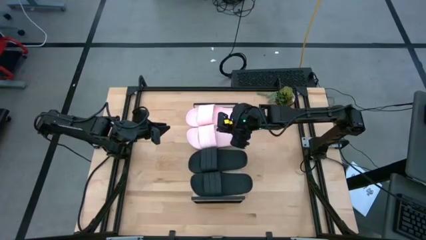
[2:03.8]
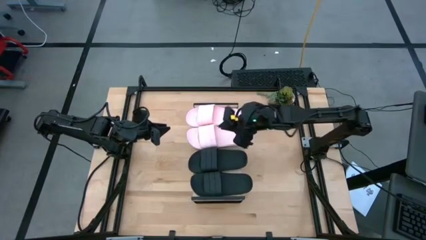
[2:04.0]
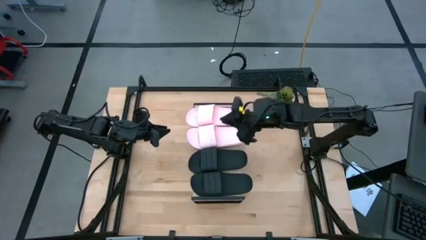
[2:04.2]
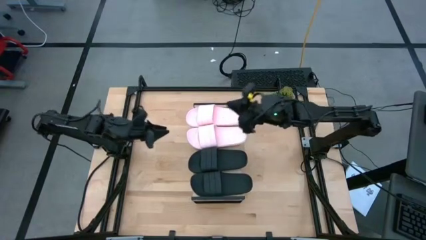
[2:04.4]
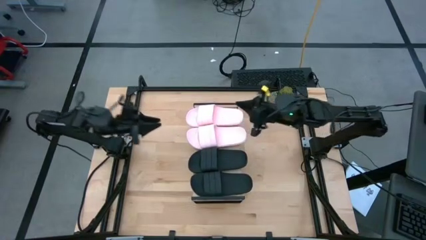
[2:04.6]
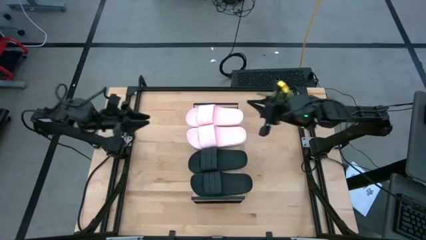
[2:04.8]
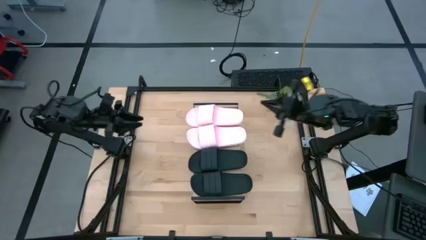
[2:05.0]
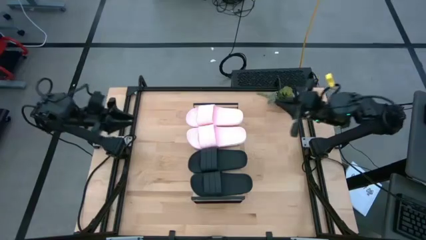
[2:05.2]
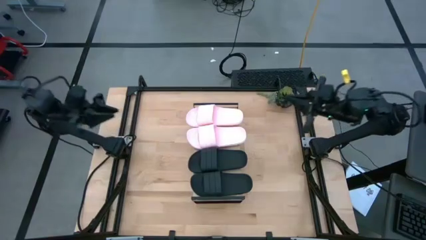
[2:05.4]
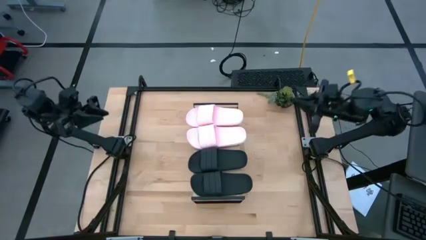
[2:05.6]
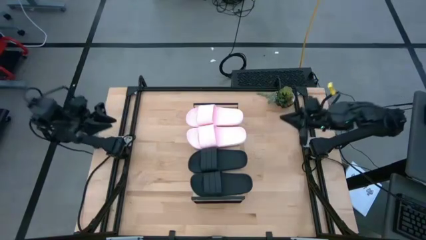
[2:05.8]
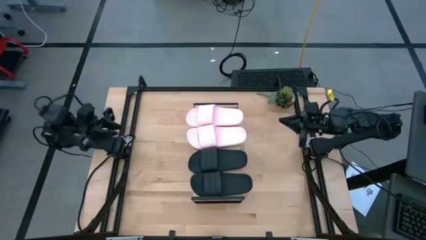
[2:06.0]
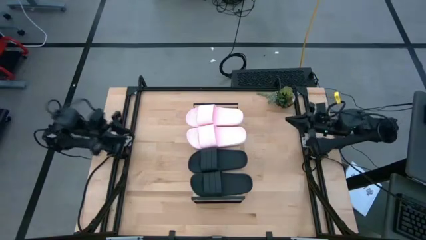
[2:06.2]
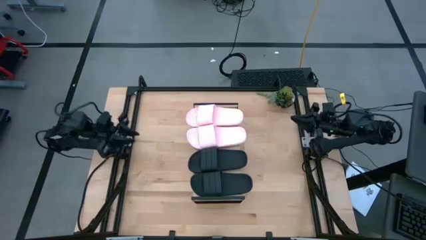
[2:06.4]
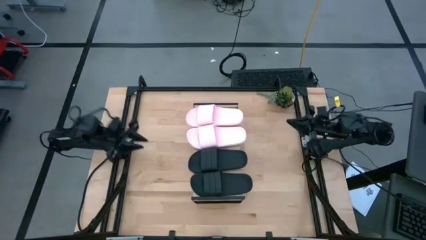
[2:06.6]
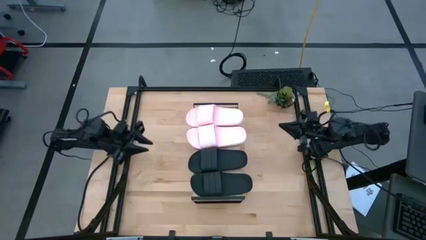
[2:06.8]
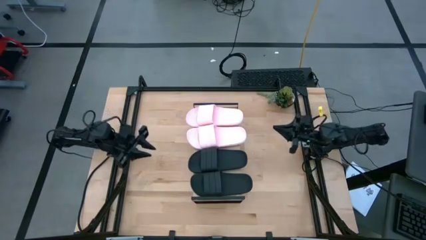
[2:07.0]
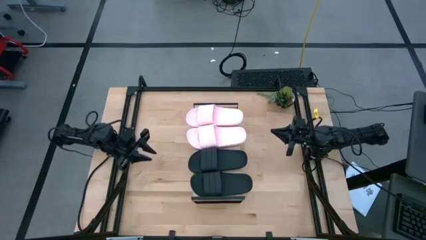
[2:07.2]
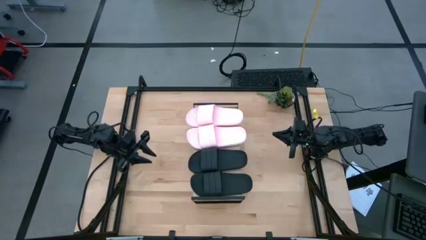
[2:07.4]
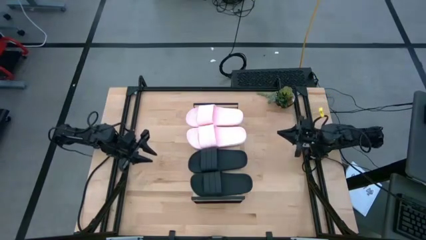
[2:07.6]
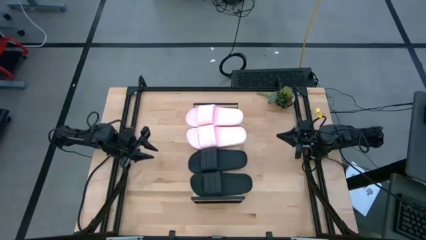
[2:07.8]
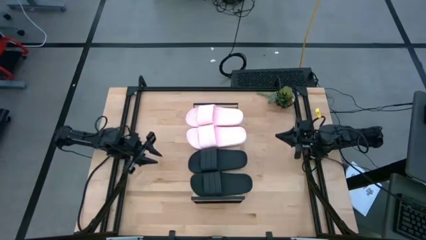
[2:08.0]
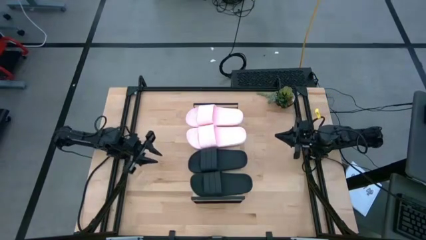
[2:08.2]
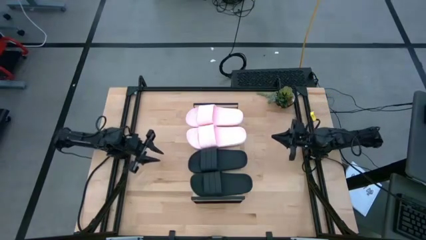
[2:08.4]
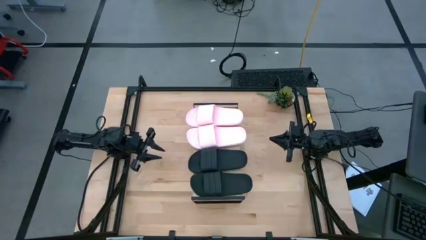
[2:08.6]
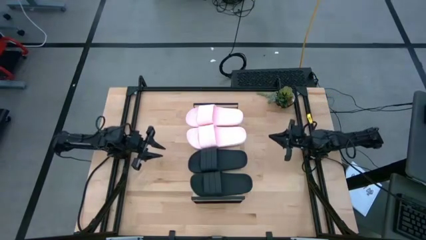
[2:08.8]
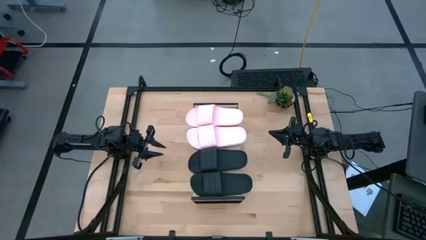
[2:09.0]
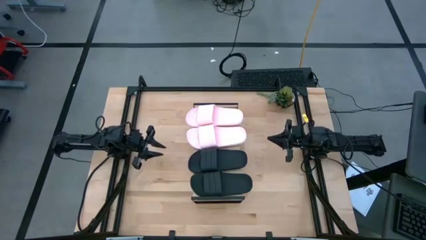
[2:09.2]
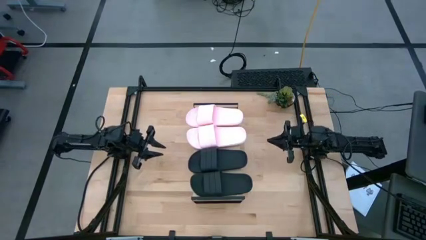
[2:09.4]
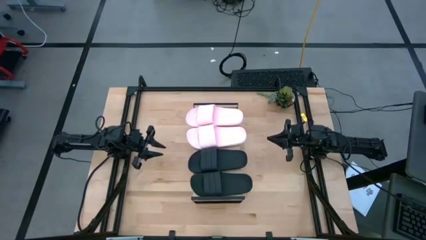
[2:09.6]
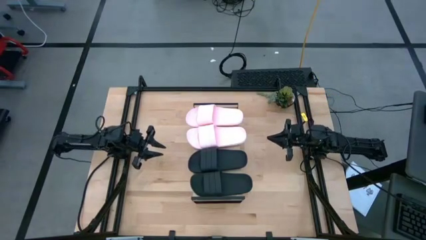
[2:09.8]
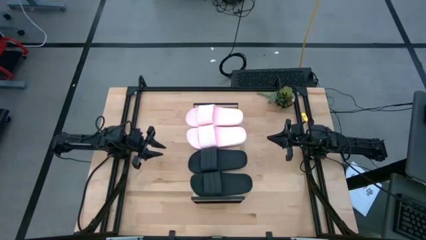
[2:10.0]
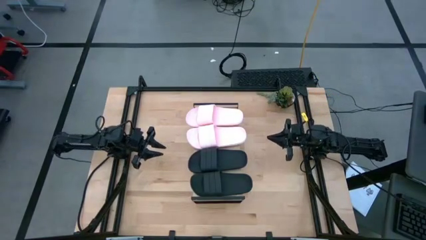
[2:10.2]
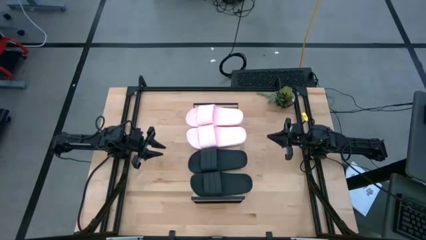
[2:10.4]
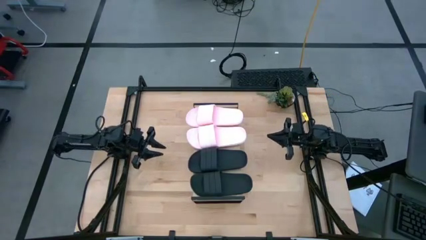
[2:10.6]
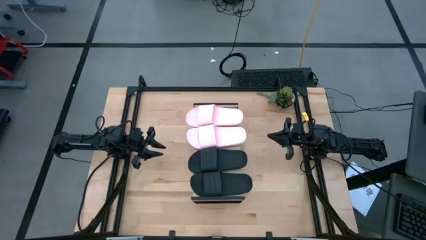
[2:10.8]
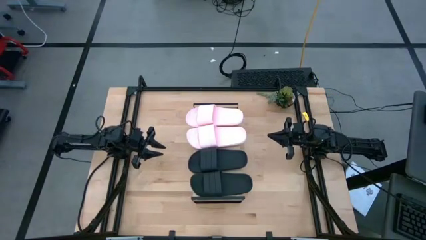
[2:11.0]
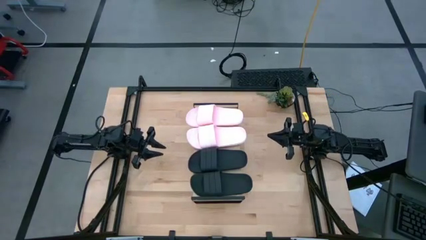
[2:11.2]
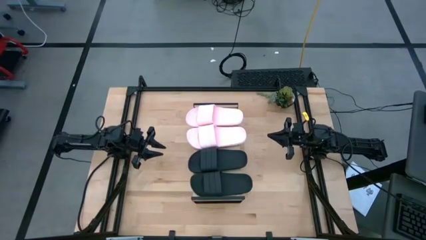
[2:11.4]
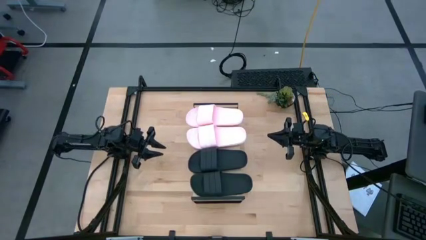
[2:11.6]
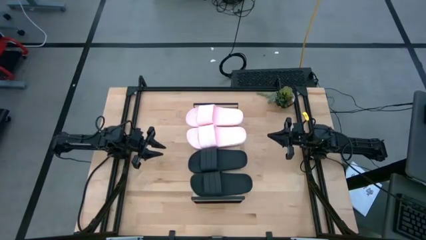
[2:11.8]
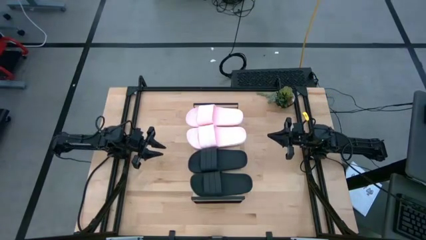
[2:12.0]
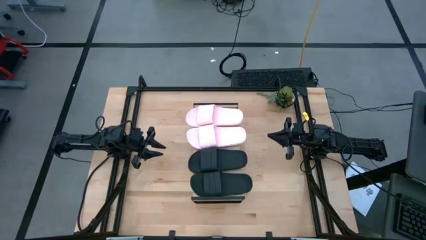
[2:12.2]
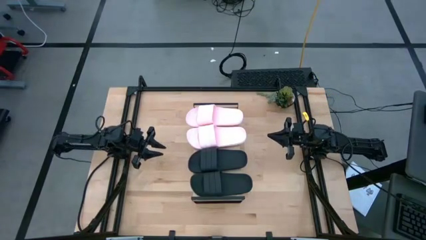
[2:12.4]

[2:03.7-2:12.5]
Task: Pick and place slides into the shelf
Return to Home Position

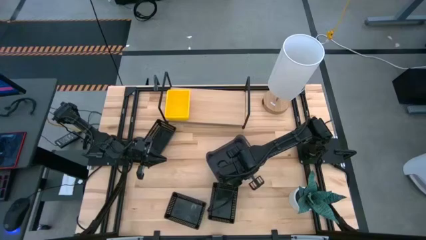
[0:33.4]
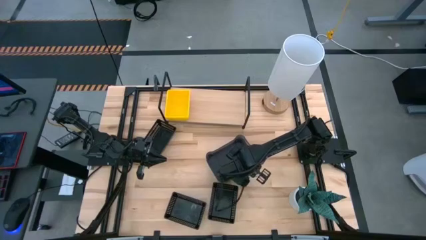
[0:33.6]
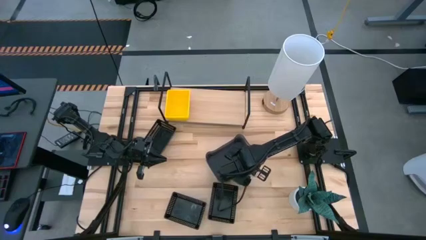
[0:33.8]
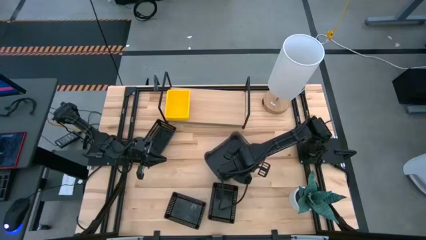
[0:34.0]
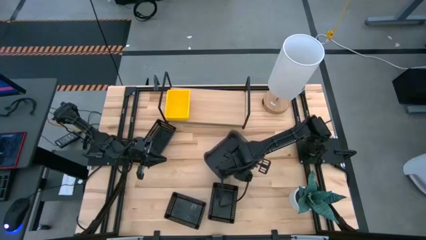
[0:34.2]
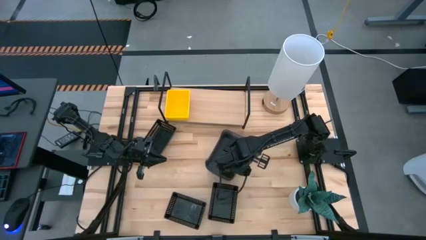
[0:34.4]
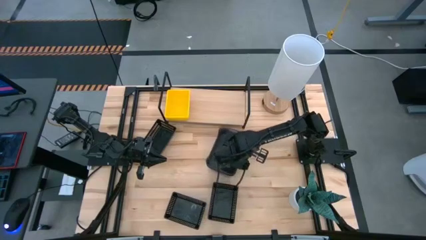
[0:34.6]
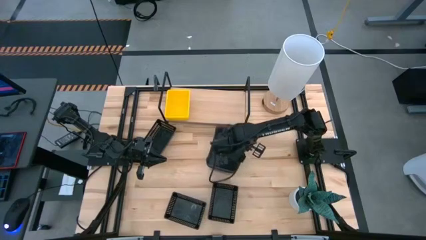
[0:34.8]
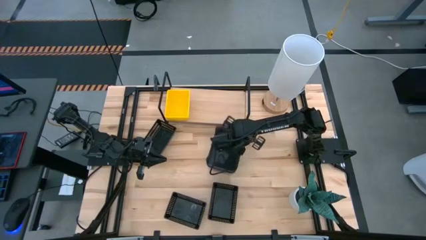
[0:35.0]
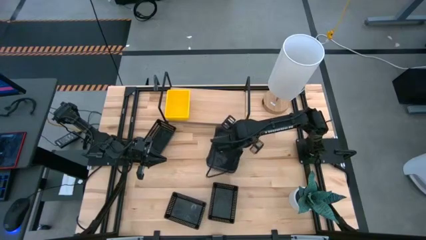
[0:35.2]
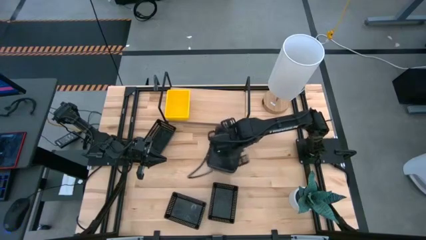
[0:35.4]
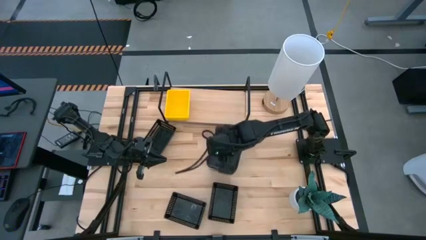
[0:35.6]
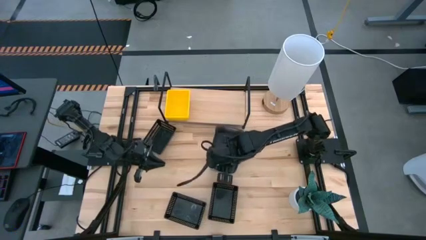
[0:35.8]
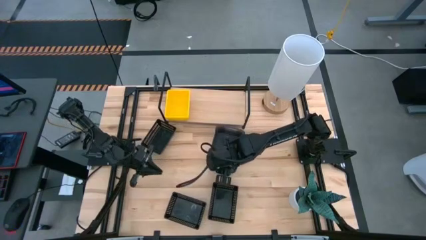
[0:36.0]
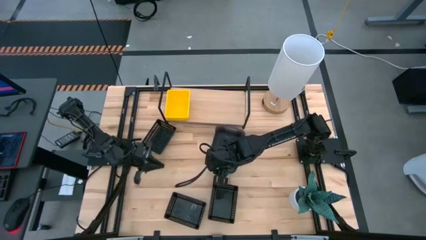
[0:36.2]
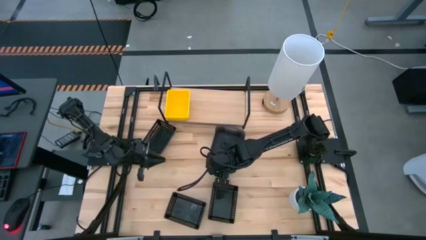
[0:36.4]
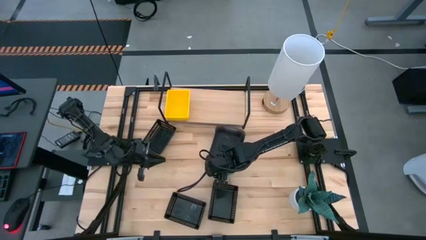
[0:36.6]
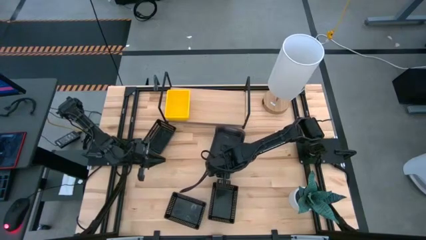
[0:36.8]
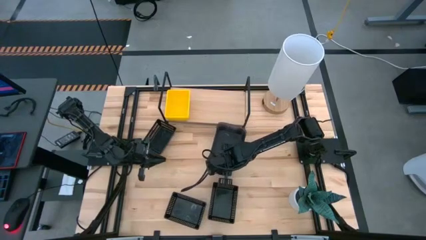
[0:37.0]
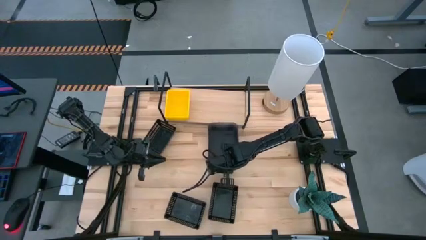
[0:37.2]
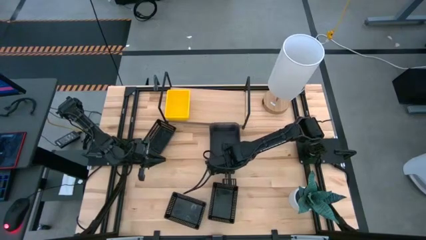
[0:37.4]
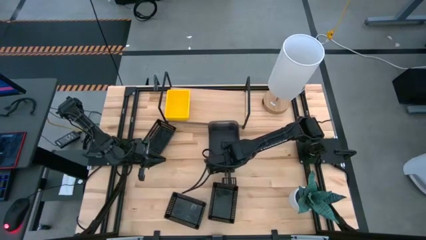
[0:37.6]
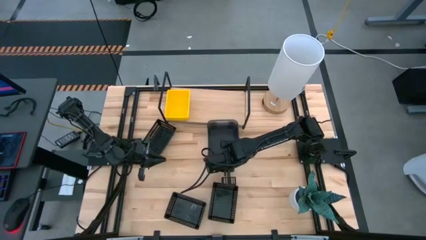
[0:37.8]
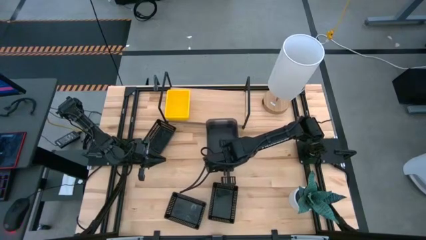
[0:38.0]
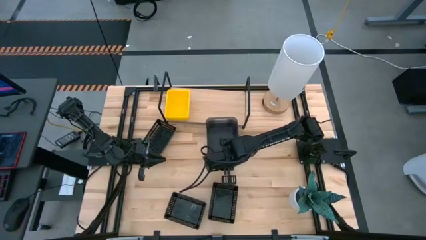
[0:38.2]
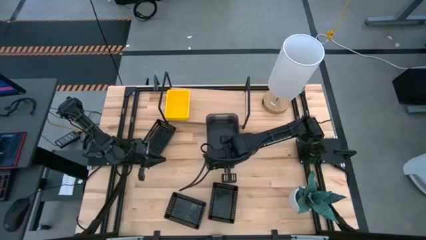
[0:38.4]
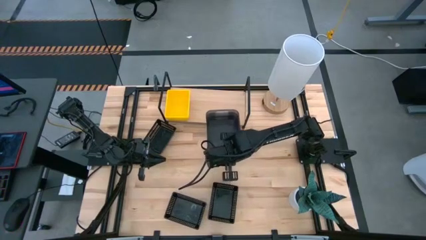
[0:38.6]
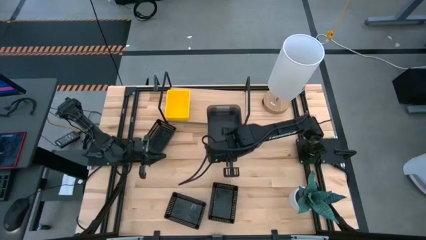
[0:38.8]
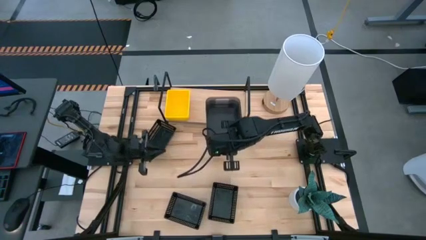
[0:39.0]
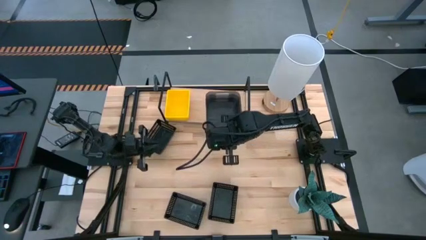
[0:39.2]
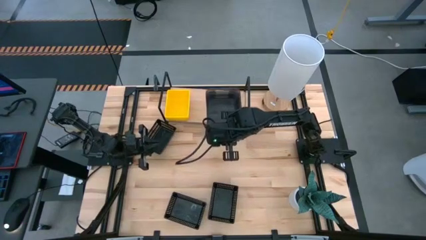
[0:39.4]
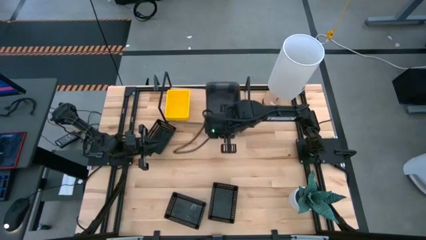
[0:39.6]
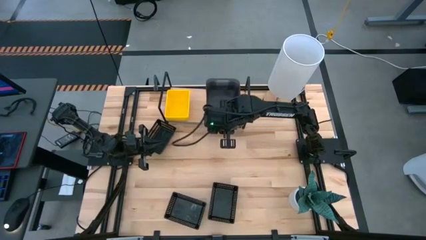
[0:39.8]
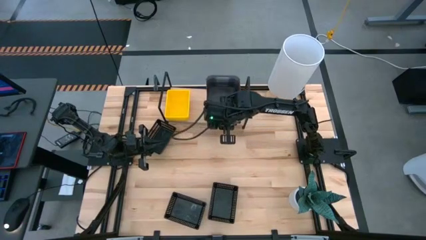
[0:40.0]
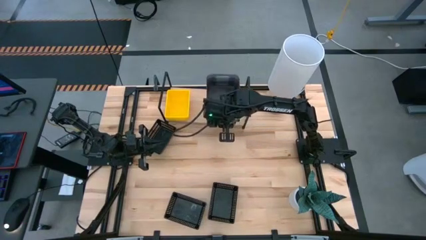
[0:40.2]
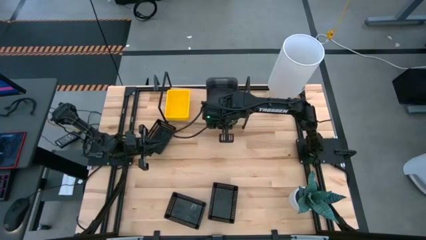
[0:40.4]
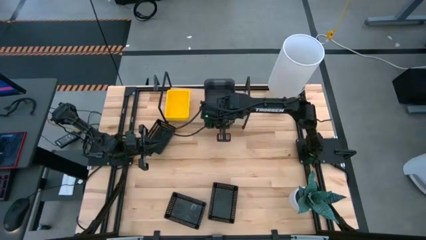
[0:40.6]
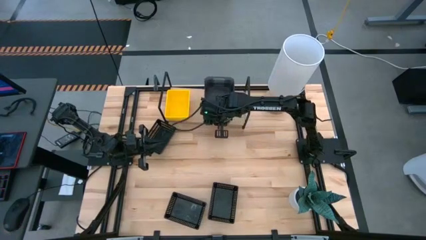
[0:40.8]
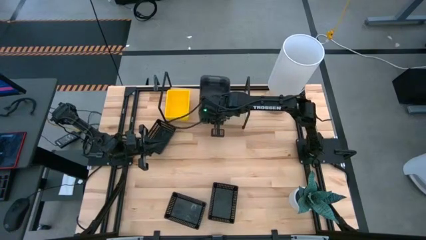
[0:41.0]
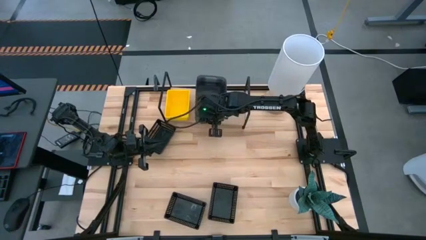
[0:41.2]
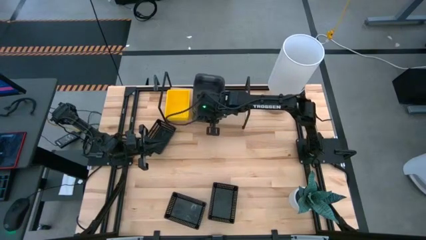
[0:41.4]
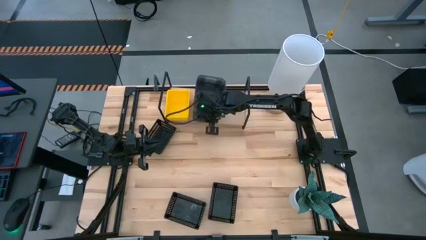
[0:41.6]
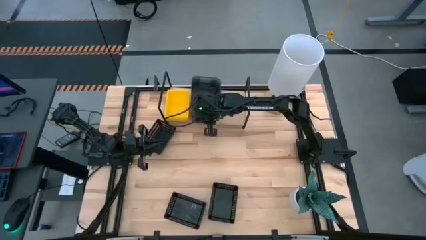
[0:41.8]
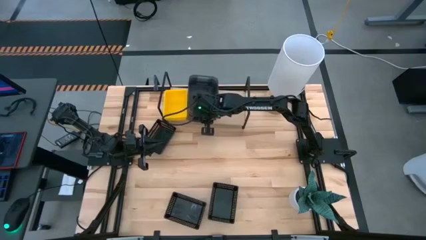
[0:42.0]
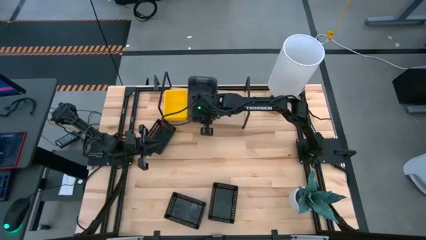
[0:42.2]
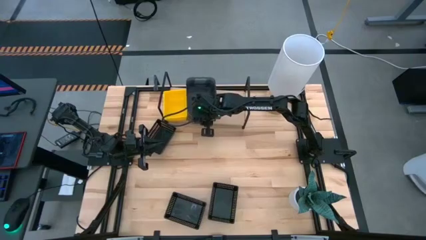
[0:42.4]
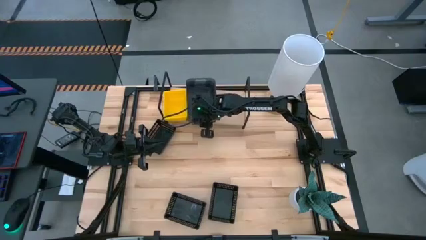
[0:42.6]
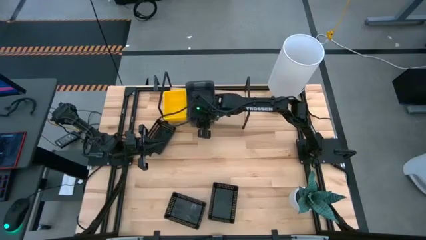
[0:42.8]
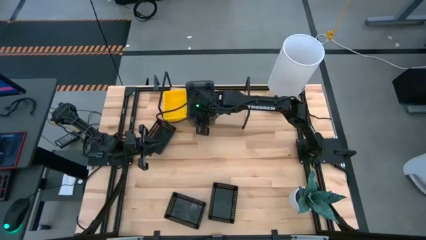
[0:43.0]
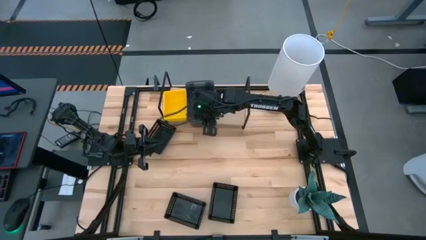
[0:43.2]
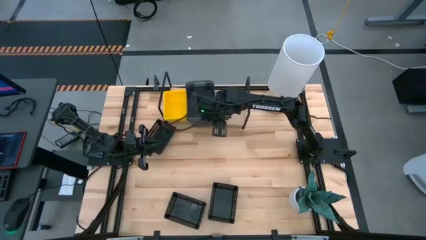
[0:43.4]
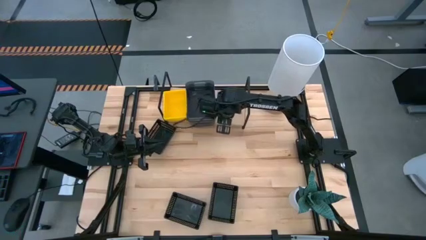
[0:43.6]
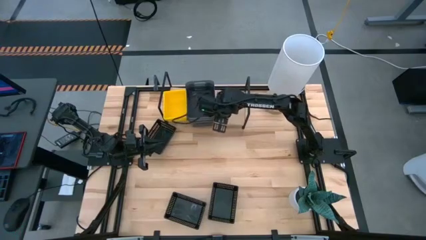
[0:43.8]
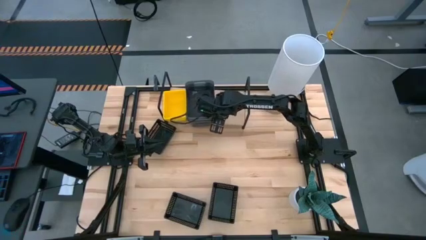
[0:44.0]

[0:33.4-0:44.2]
Task: Stack baskets on shelf by color
Put the stack of light black bins on the shelf
